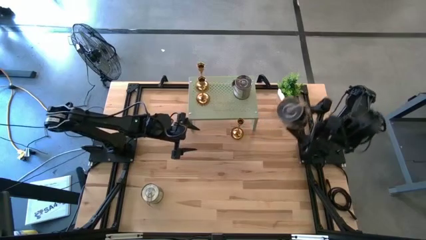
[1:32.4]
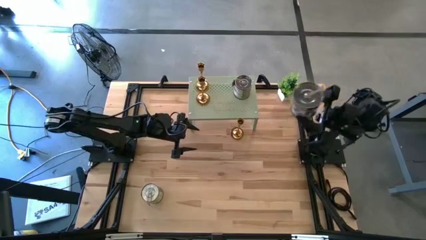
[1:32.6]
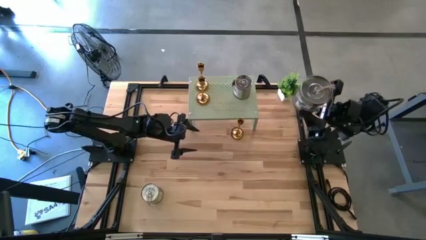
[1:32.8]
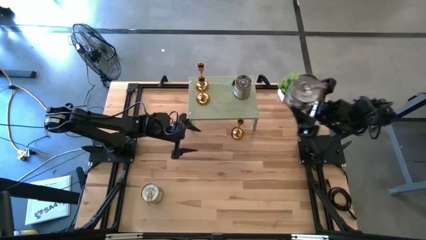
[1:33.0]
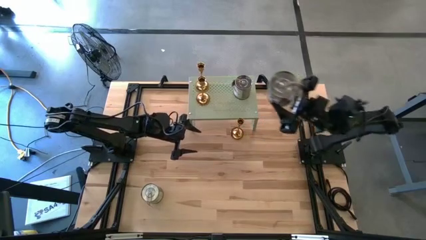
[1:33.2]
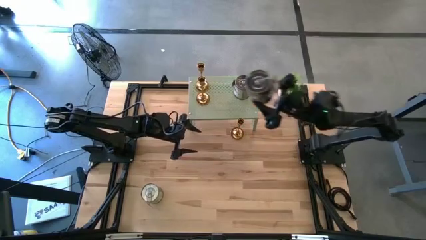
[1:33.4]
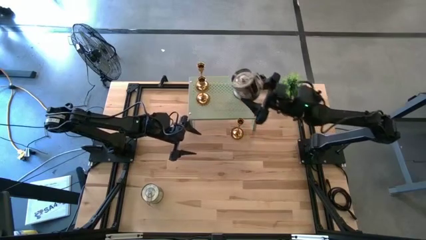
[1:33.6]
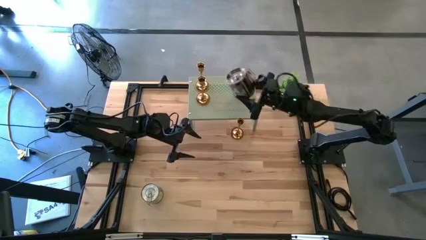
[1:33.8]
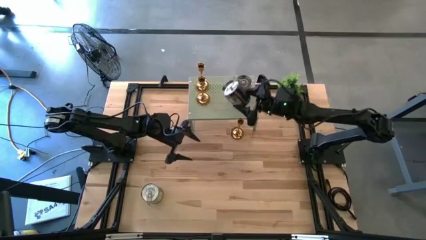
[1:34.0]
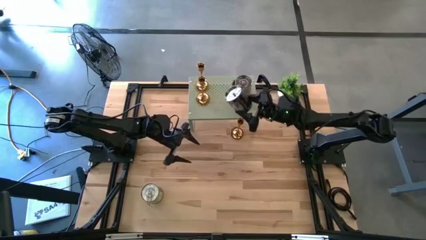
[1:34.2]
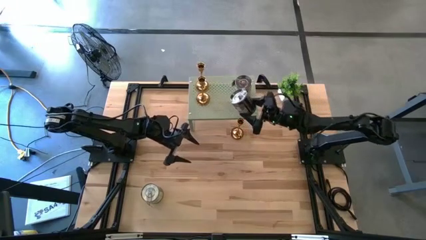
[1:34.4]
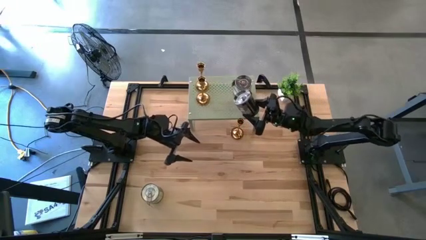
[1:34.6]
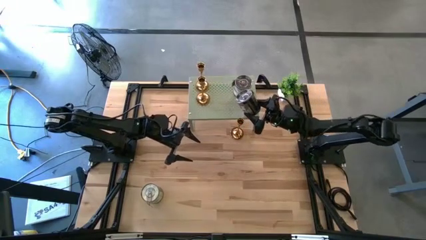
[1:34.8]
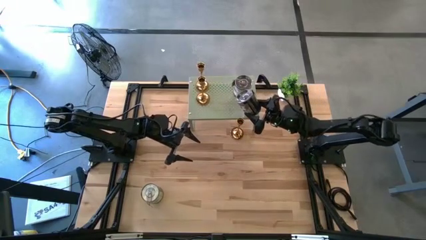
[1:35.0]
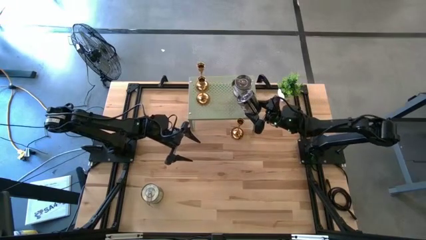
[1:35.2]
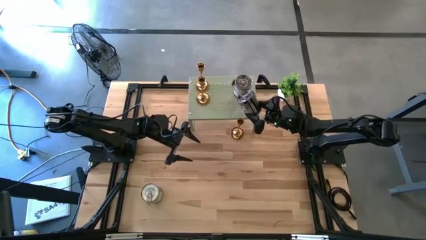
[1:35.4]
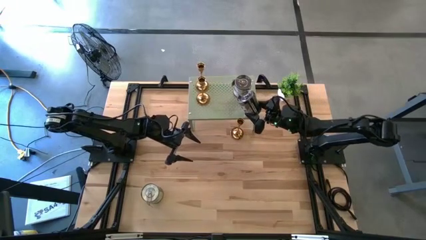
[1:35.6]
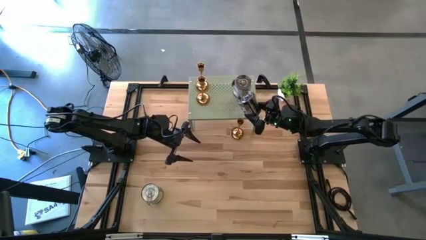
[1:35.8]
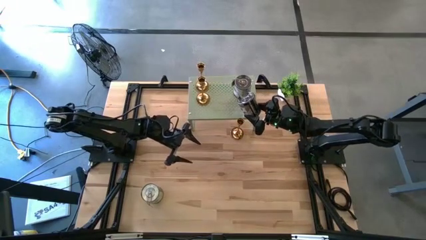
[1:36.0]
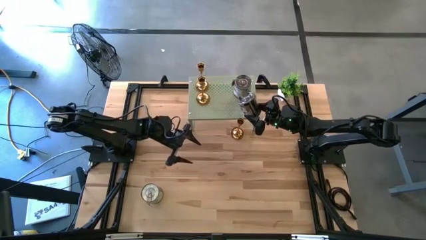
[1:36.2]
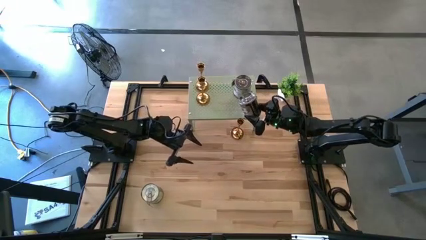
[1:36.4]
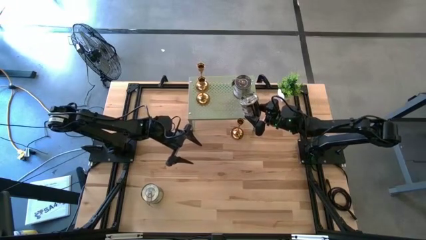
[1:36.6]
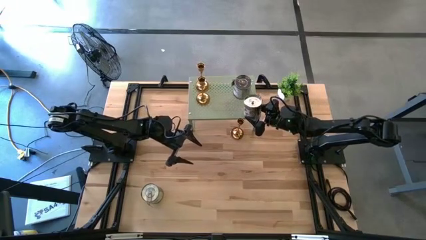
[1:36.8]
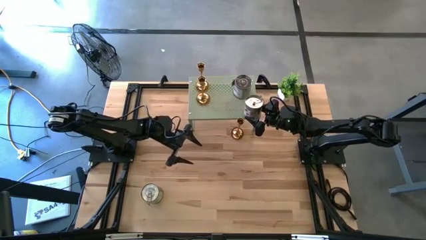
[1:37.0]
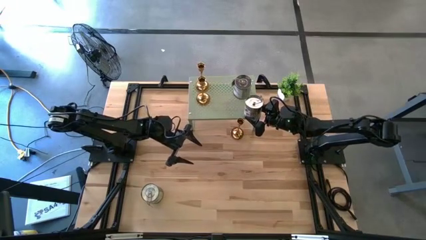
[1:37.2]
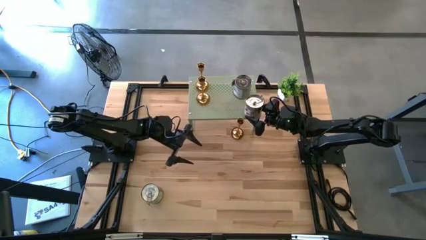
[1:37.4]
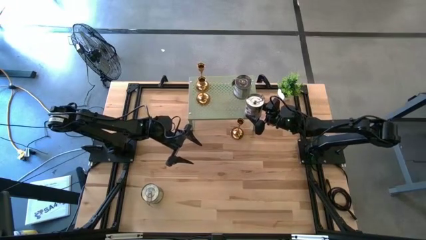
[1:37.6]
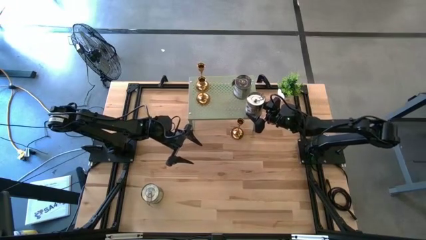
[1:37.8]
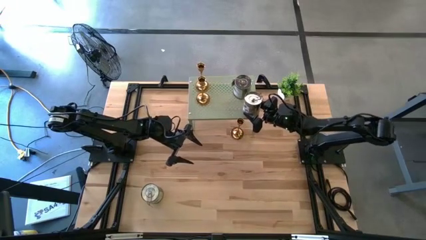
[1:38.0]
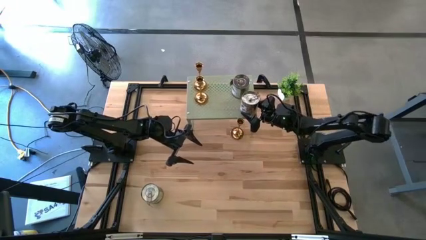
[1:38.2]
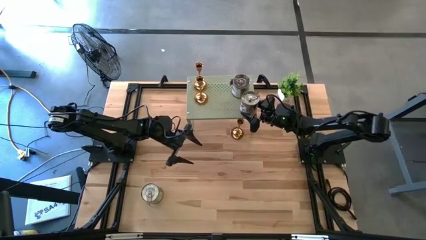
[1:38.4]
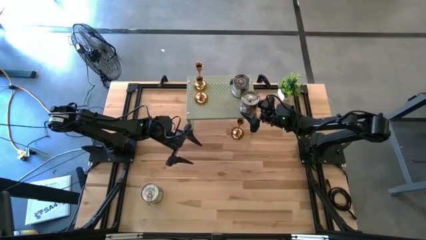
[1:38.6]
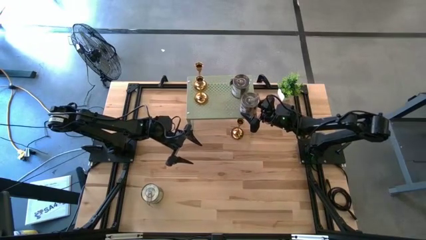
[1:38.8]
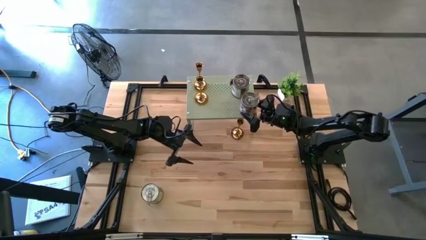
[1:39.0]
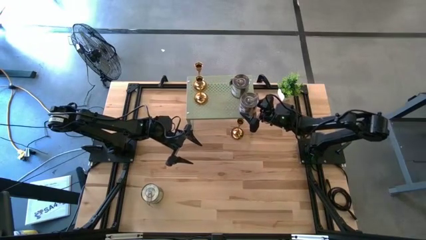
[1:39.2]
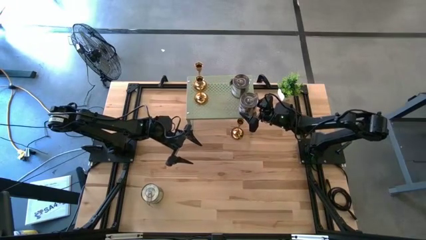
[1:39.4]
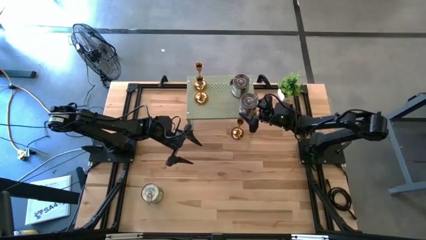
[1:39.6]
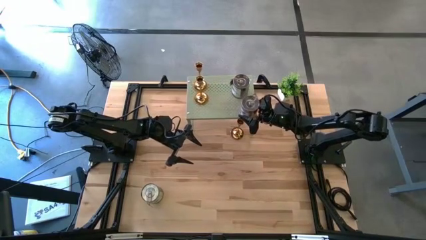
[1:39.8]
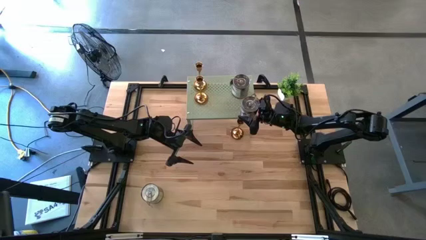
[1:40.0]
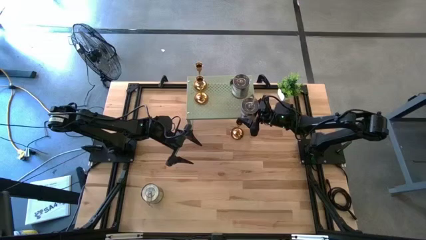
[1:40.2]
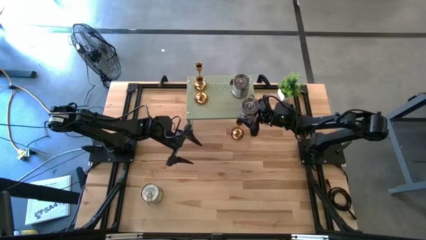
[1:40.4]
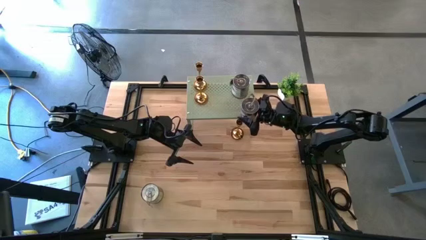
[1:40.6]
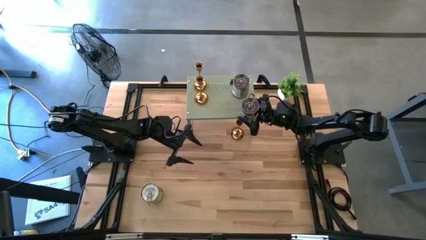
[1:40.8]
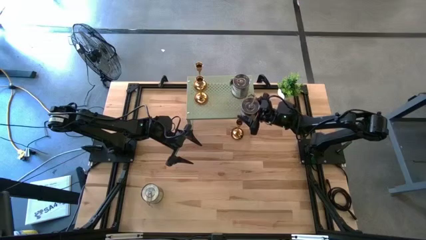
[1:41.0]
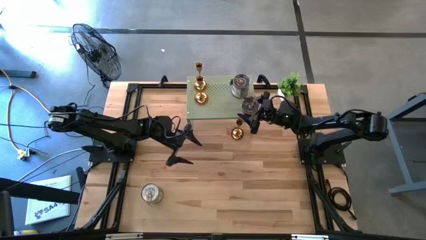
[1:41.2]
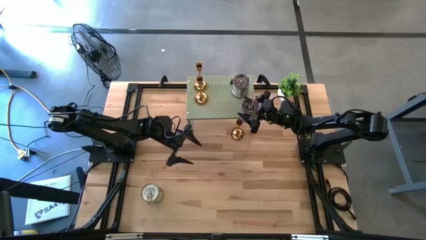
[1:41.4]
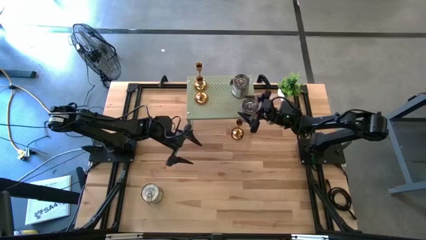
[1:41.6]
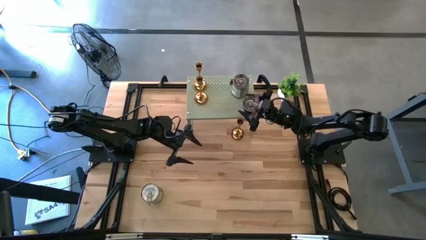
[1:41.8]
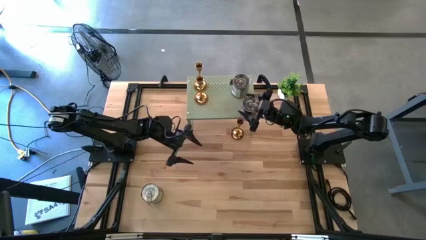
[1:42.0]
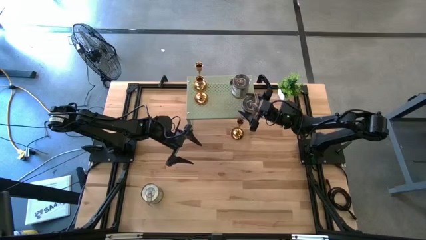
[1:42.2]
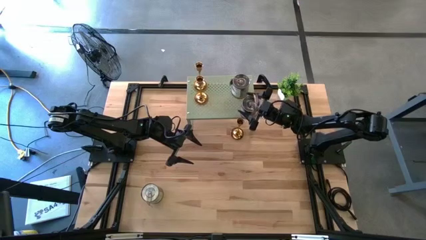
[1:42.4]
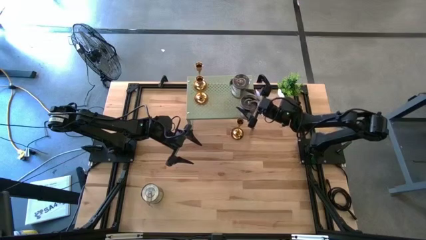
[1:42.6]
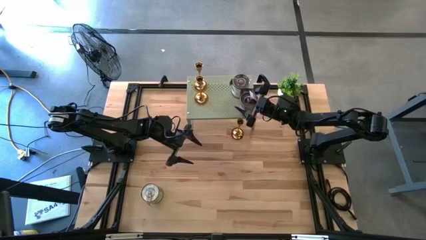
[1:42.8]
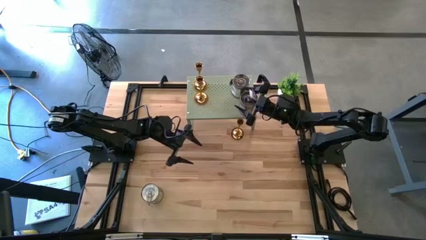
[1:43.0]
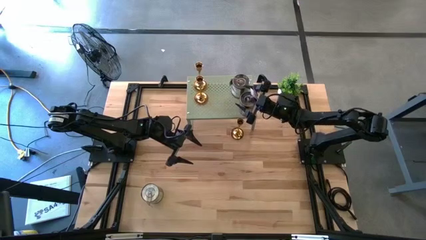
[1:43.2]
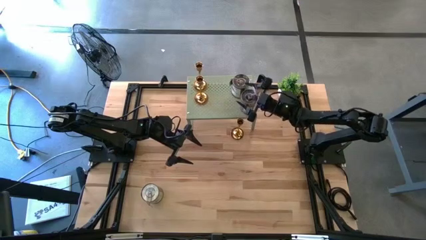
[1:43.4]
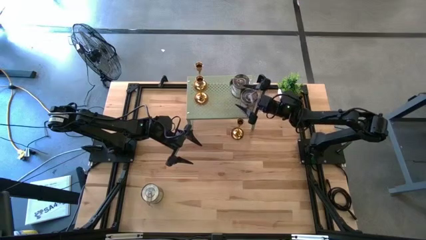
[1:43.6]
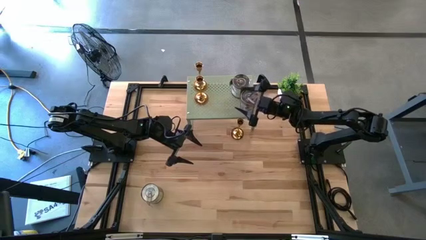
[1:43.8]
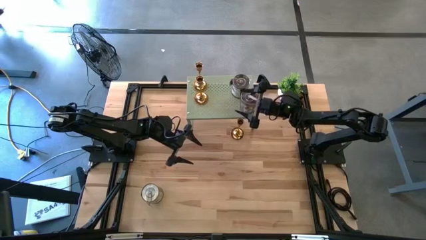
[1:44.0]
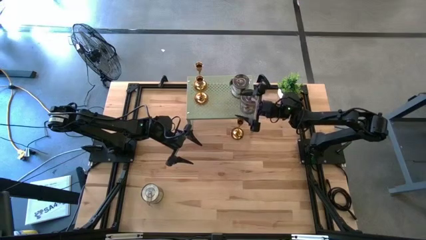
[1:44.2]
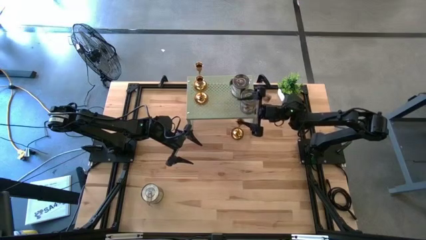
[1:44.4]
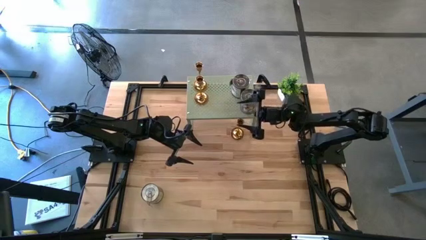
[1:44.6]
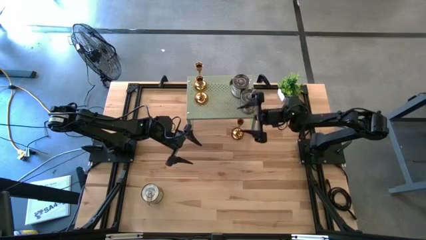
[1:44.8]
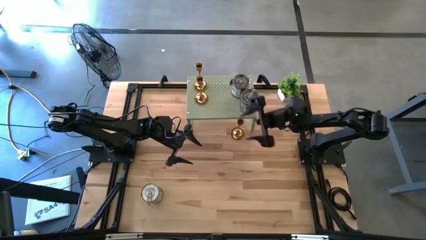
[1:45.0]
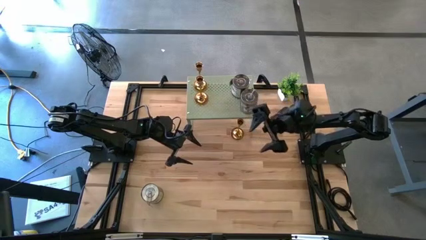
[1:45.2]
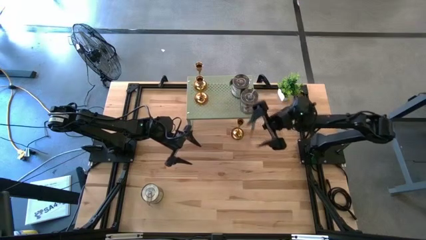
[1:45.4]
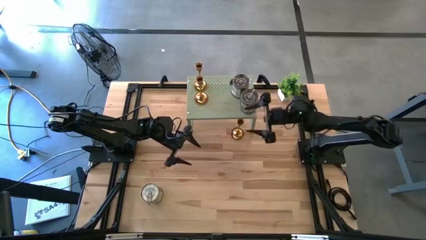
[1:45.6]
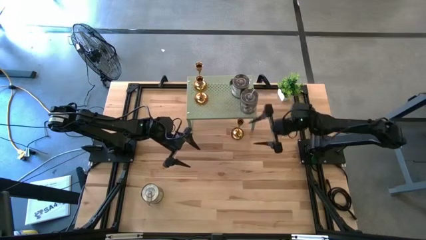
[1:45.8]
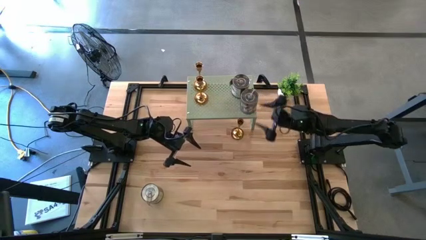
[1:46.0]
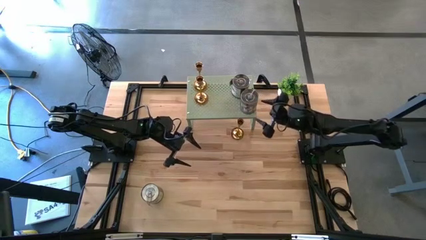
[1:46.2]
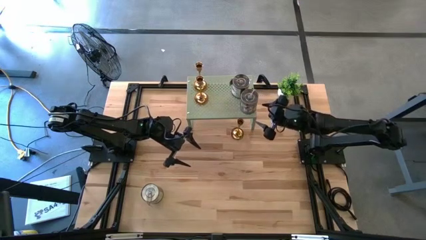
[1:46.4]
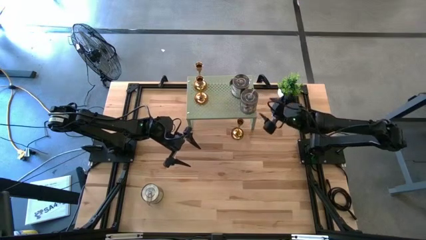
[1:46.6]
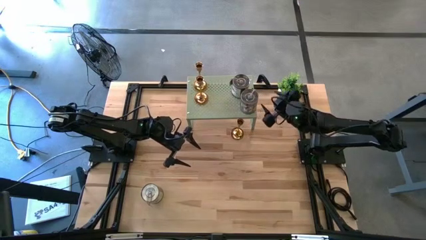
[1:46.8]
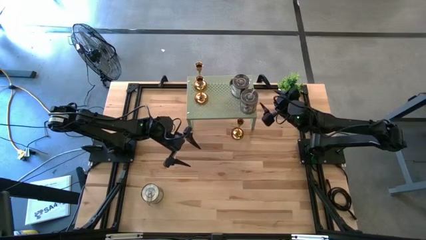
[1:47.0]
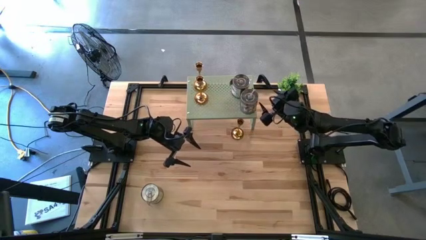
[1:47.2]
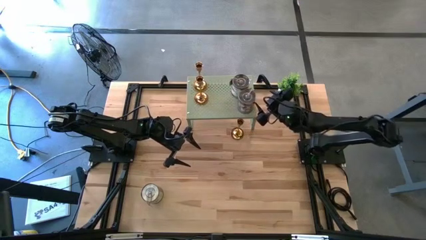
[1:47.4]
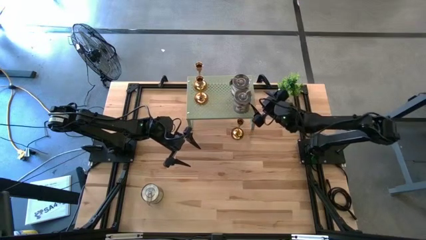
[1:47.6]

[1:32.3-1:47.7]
Task: Pick & Place candle stick holders
Put the top silver scented candle on the shelf aligned with the other silver scented candle
